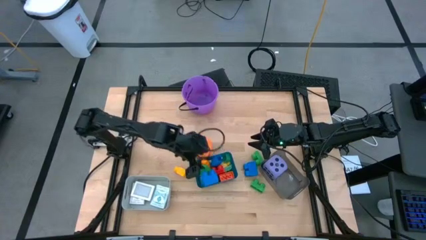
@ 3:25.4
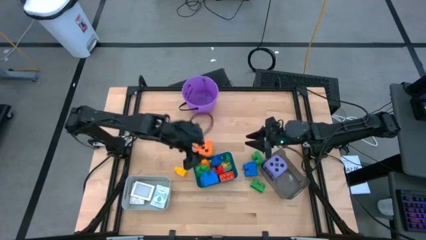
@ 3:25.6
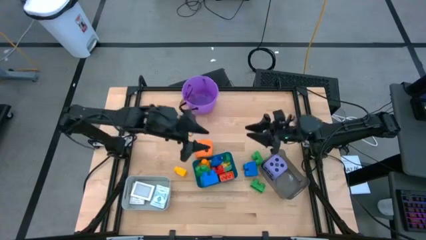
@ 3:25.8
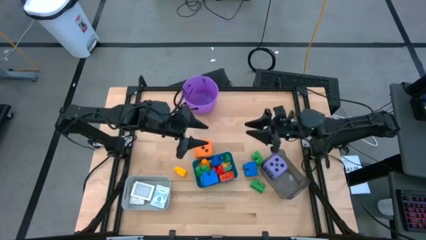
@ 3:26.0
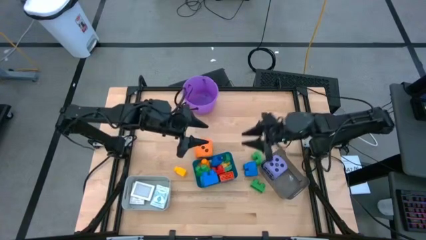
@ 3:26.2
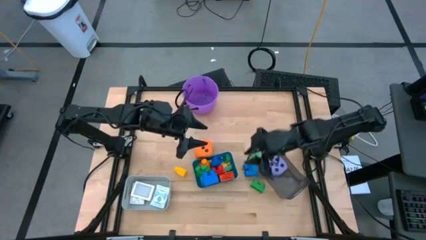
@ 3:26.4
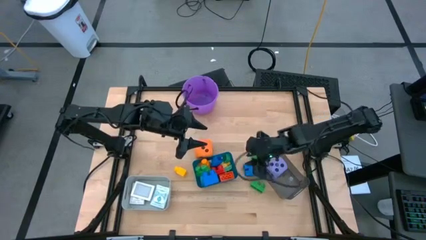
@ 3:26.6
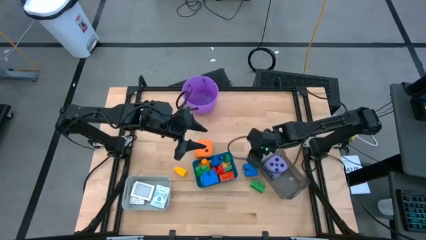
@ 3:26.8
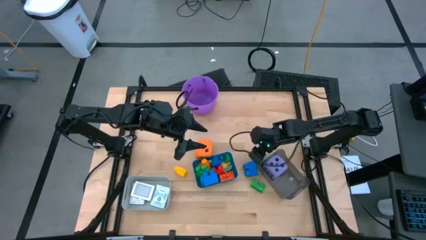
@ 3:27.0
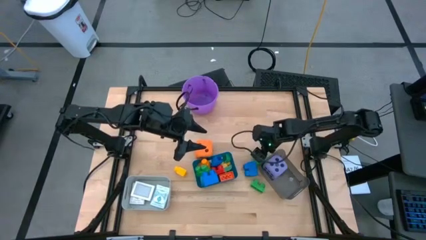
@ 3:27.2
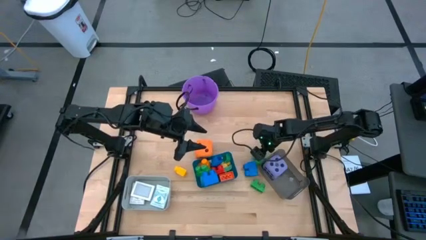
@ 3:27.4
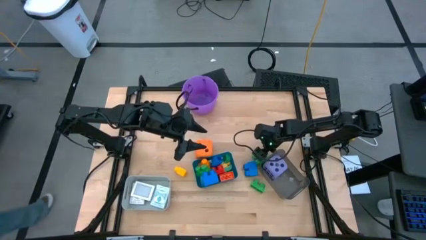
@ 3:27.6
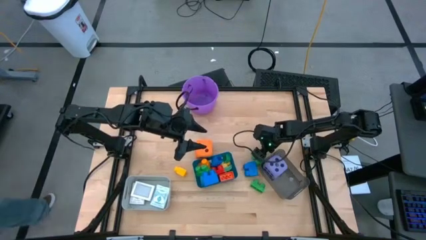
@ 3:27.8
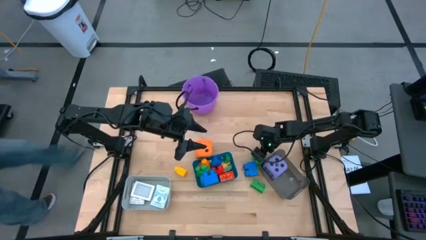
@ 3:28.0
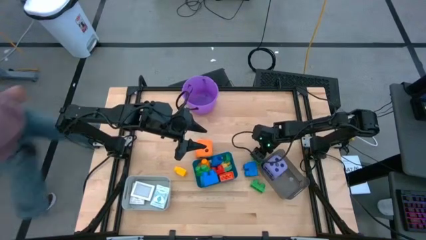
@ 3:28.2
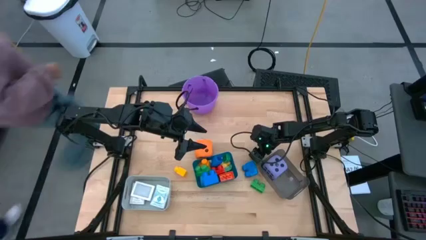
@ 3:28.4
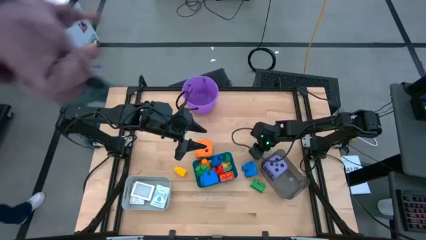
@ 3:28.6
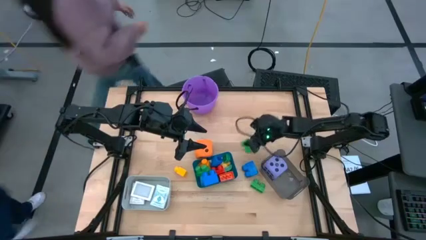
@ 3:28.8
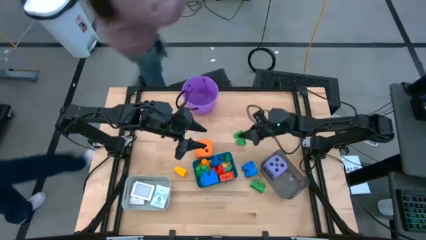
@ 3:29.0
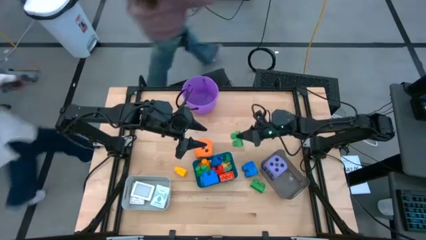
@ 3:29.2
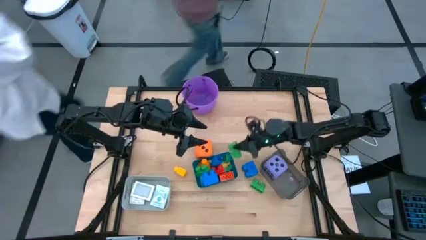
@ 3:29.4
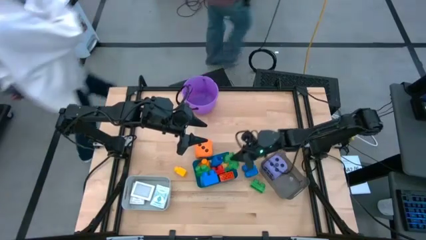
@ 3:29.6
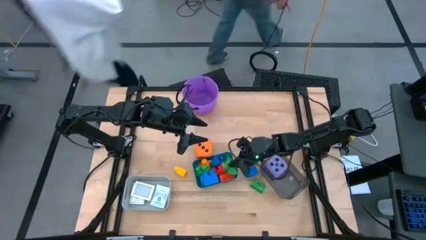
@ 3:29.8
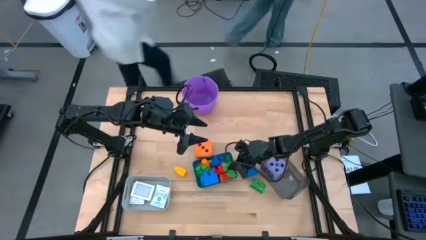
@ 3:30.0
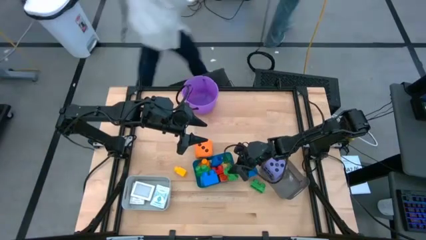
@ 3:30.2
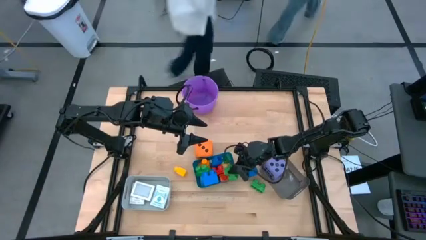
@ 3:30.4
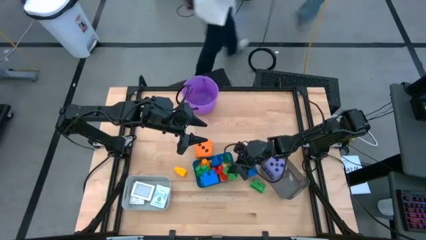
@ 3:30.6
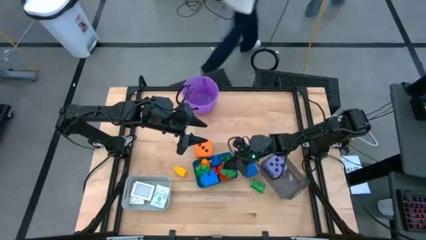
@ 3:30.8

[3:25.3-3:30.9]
Task: Pick & Place Toys
Put the top green game piece into the blue bin

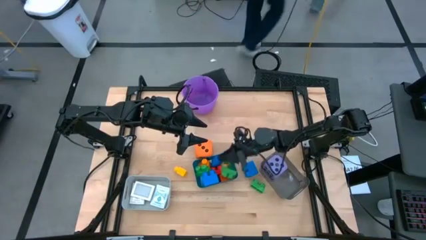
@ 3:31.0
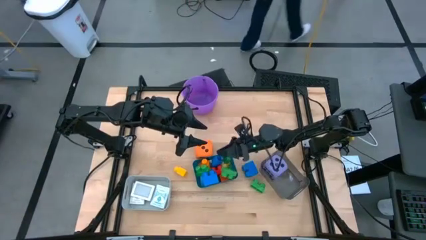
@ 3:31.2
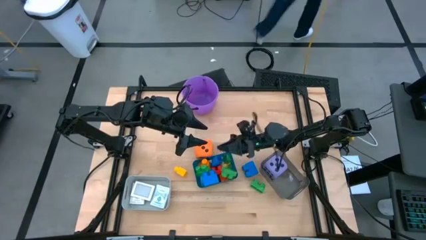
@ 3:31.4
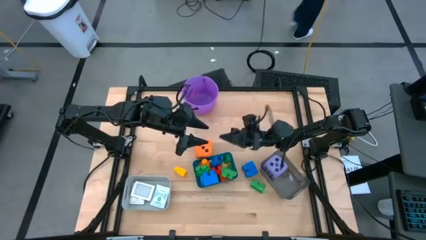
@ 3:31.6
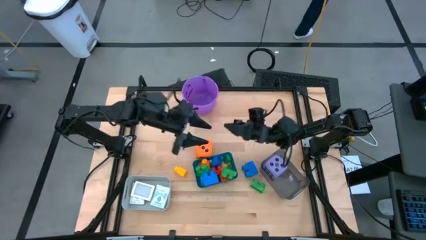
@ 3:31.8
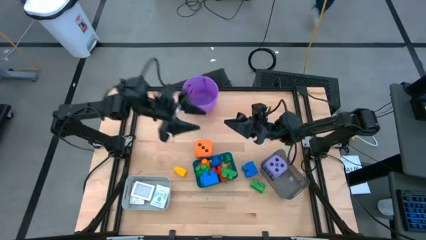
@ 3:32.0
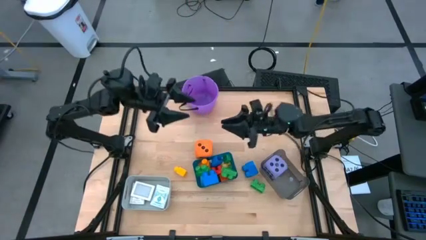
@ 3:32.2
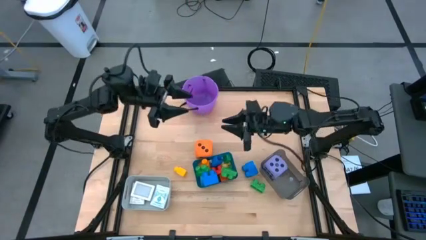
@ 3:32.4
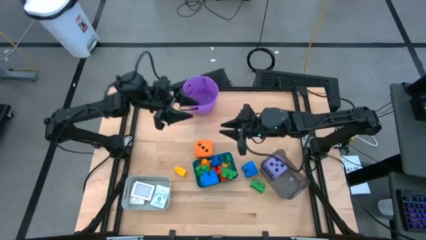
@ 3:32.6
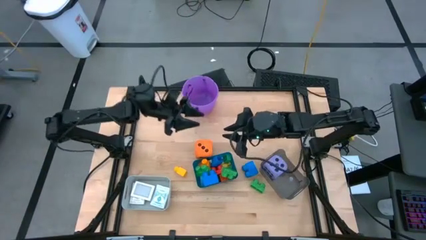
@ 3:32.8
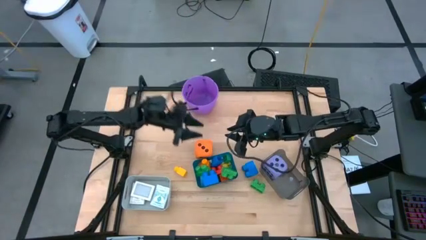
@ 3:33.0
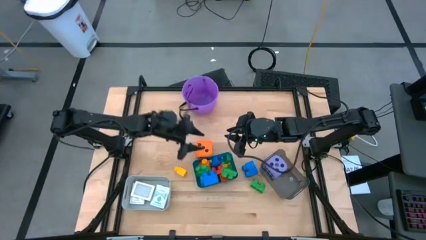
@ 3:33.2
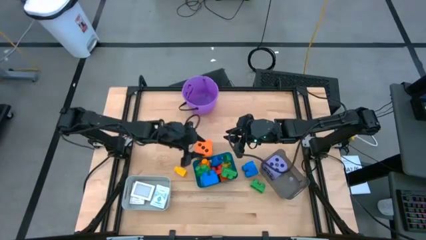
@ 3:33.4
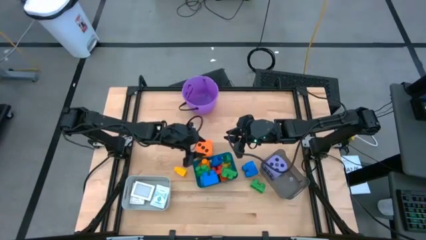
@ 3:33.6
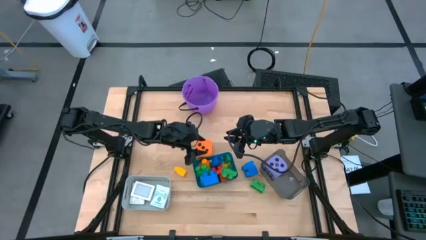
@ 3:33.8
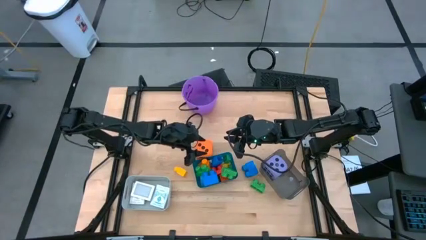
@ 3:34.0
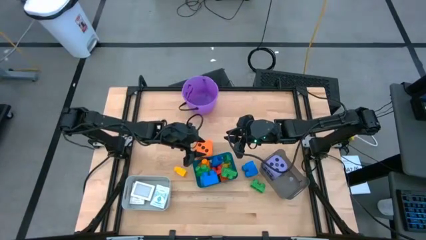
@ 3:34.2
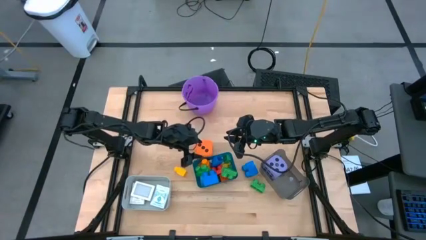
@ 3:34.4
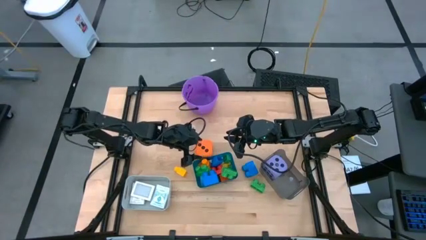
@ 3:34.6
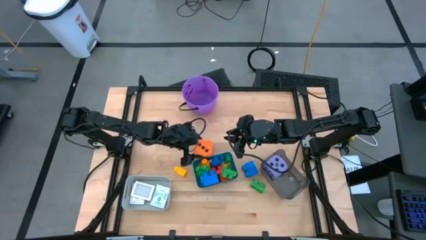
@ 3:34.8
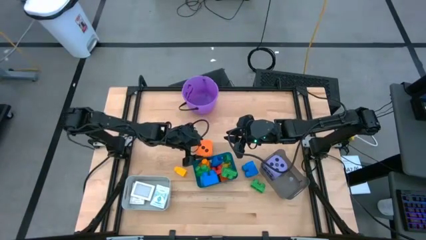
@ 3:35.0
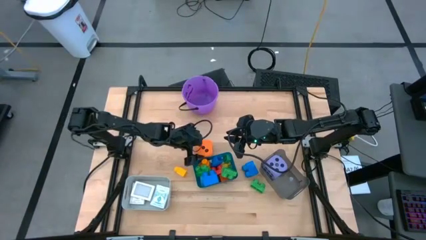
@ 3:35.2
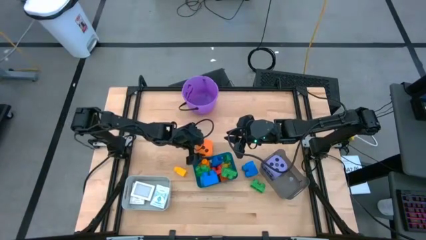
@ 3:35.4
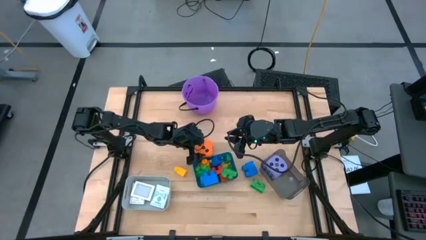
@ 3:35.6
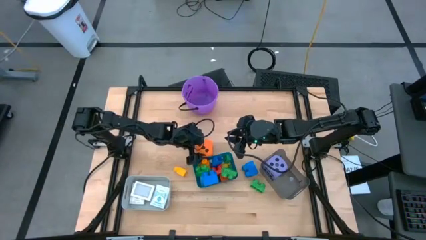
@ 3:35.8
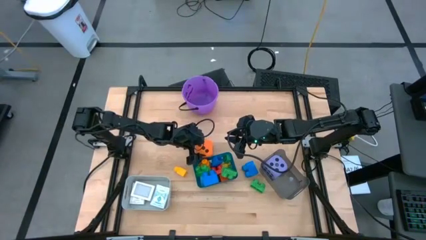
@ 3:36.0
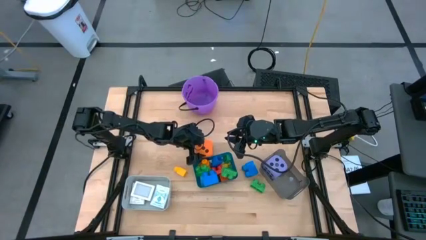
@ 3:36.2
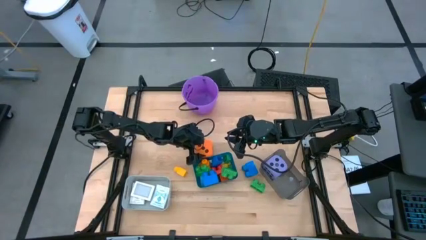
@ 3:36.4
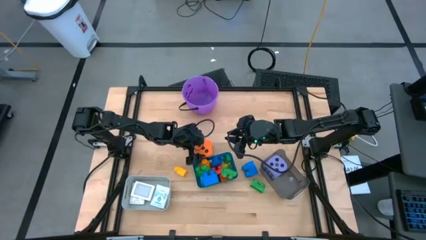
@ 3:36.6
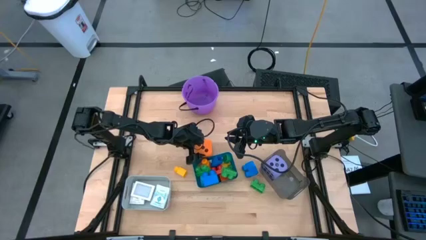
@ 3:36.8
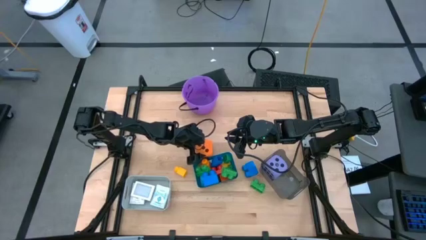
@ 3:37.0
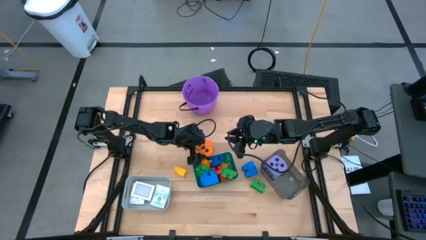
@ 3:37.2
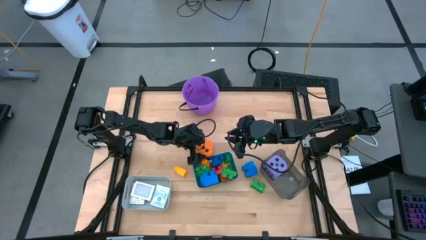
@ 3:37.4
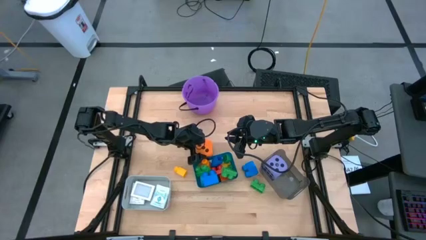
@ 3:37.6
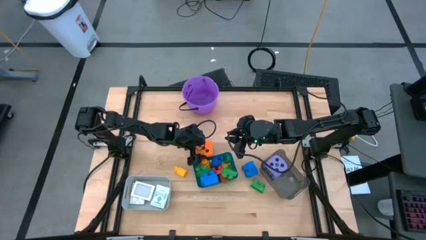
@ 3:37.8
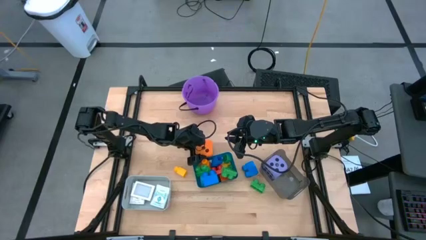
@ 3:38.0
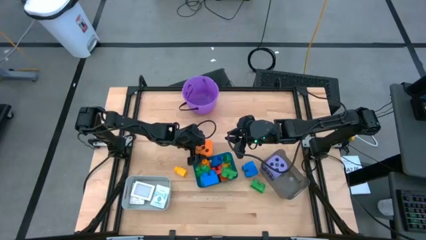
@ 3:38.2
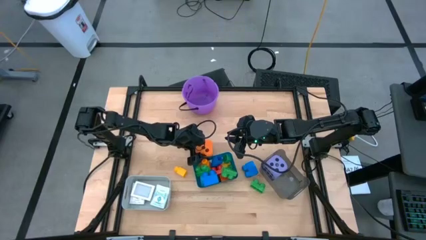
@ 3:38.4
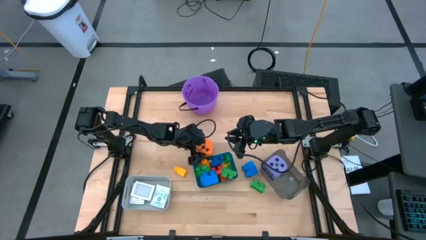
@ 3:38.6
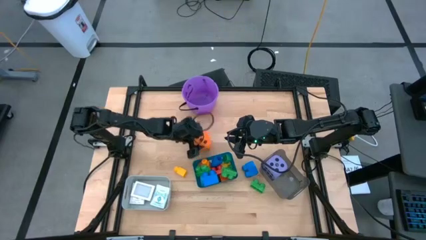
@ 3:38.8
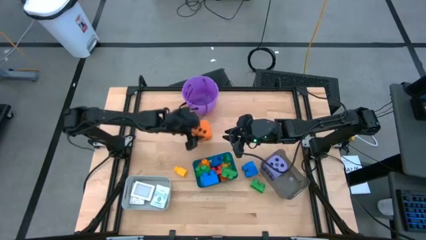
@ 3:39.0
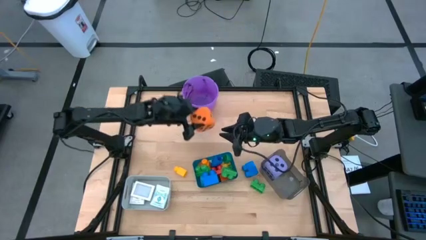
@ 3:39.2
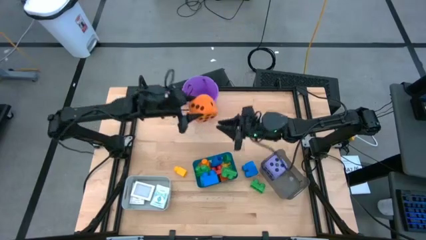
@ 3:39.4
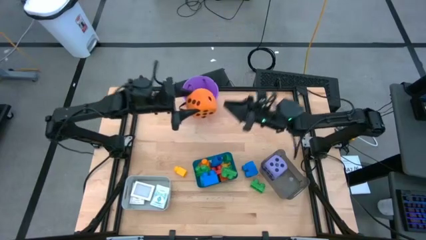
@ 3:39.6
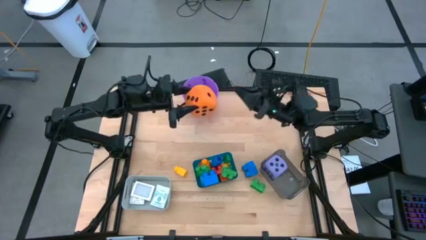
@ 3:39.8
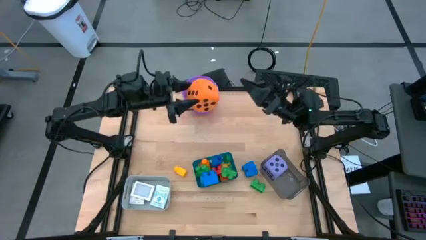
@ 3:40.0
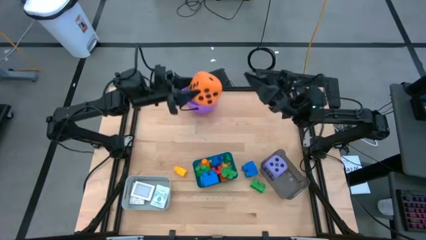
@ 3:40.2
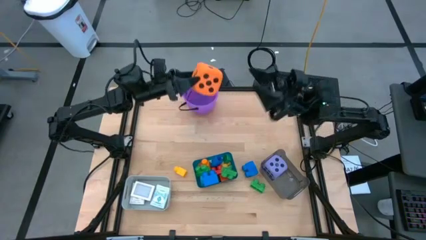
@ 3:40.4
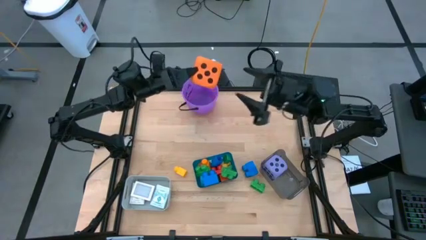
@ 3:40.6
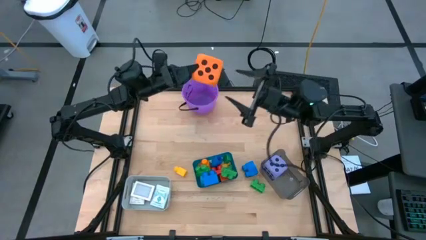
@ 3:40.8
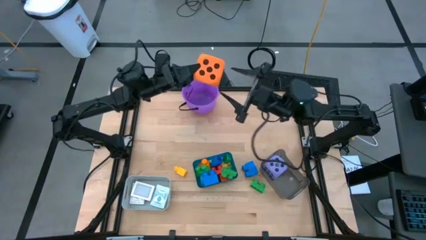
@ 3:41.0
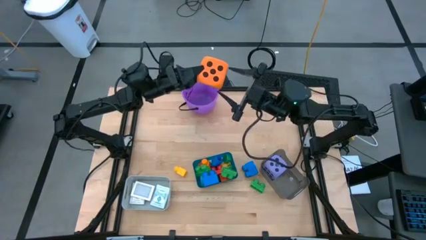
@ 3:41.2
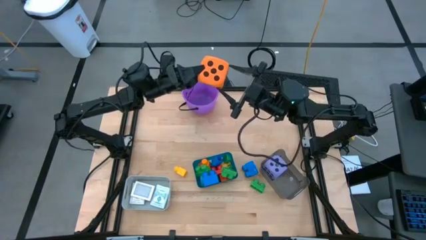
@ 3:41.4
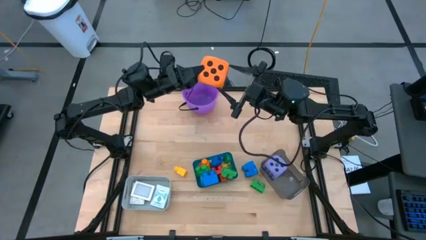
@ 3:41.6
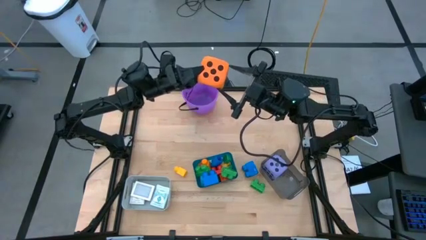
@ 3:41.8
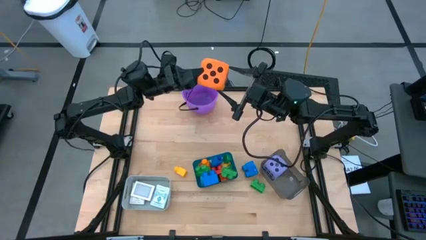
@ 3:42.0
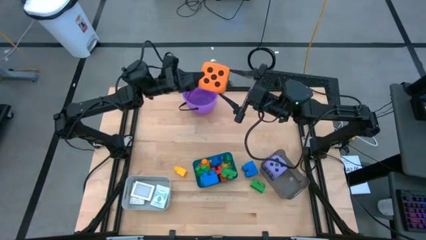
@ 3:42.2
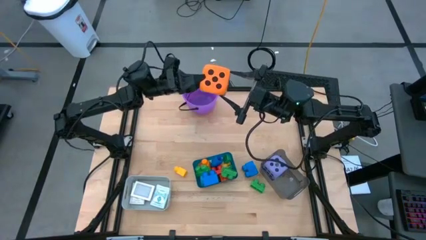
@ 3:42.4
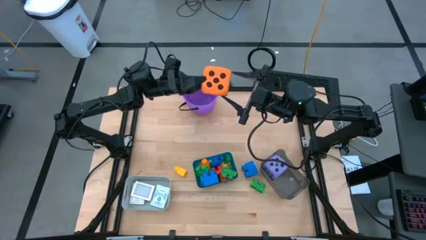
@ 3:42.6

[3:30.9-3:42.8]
Put the orange dice into the black bin
